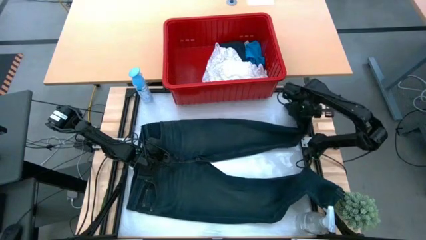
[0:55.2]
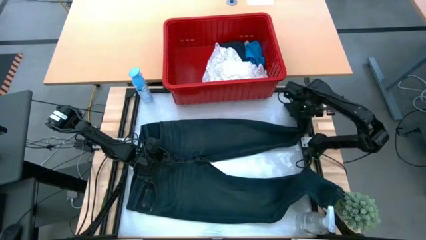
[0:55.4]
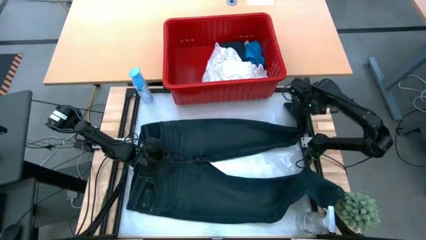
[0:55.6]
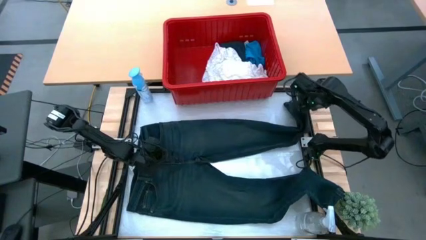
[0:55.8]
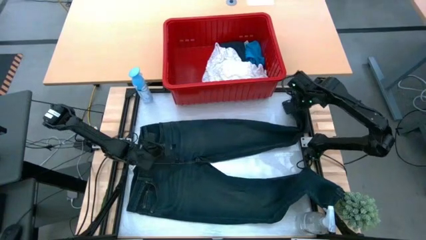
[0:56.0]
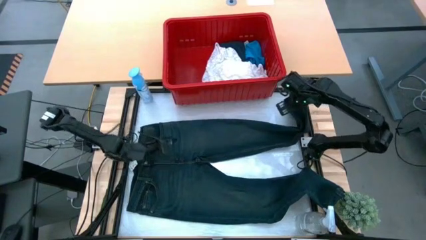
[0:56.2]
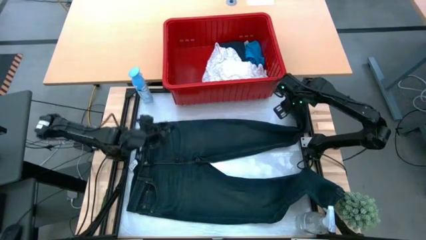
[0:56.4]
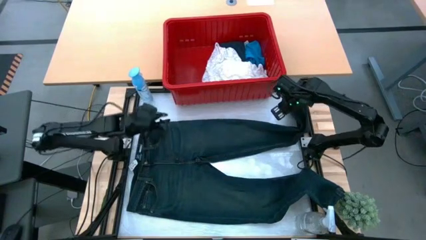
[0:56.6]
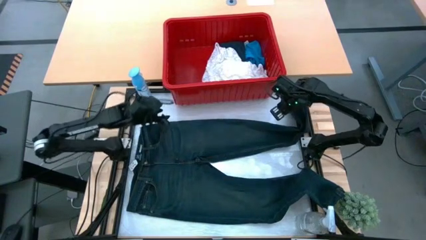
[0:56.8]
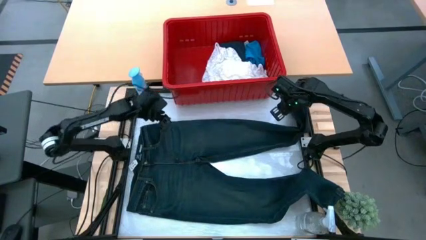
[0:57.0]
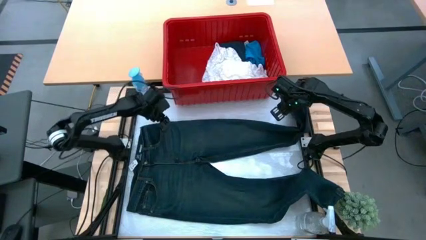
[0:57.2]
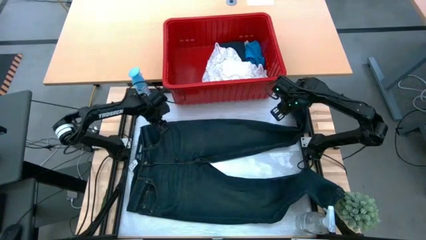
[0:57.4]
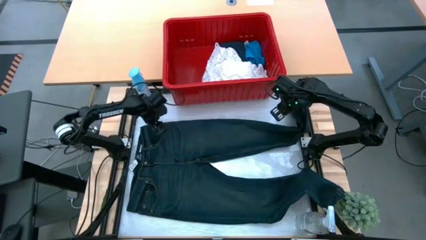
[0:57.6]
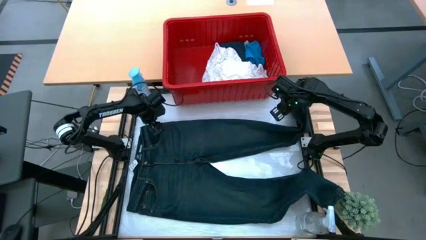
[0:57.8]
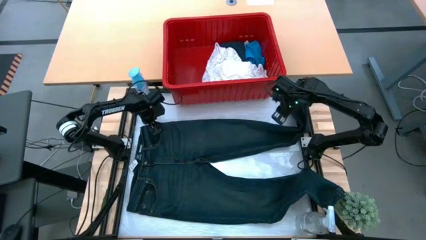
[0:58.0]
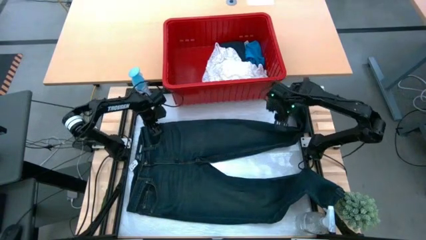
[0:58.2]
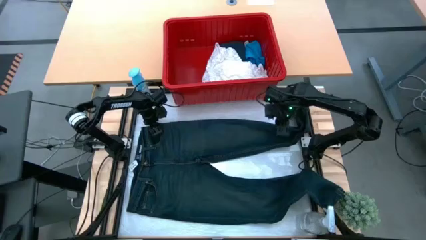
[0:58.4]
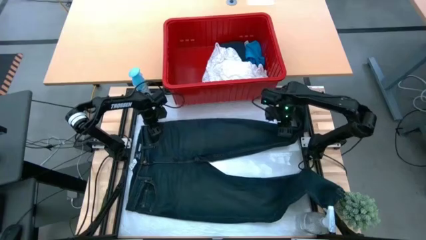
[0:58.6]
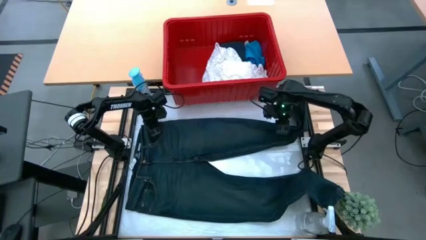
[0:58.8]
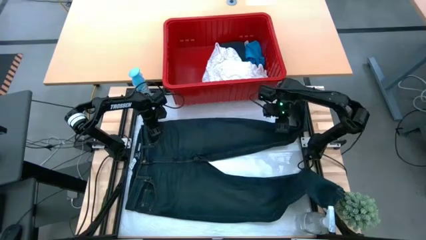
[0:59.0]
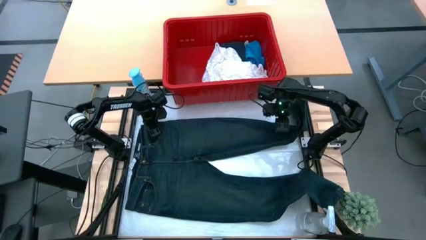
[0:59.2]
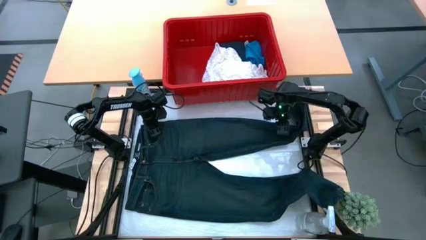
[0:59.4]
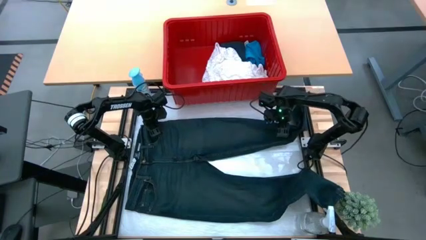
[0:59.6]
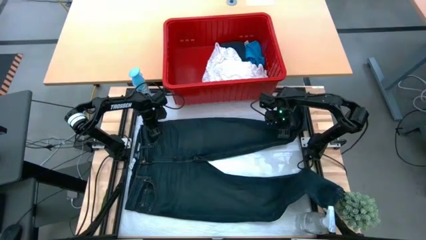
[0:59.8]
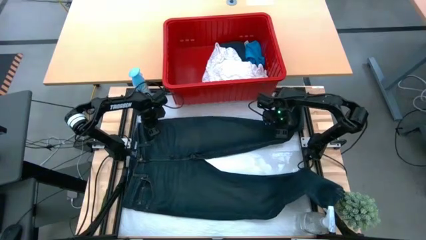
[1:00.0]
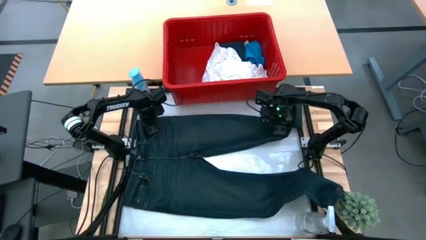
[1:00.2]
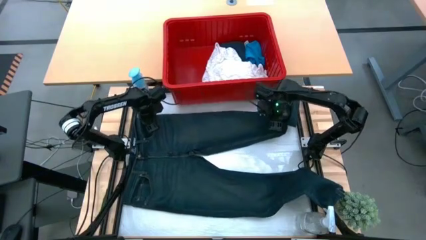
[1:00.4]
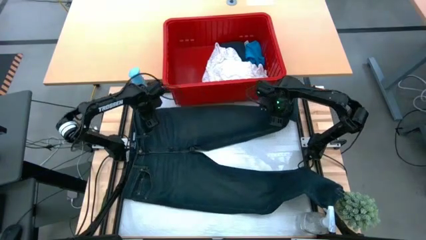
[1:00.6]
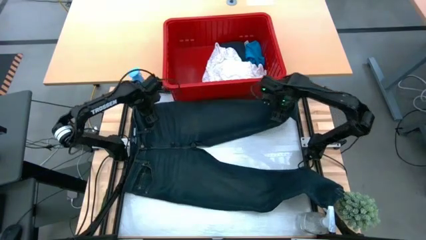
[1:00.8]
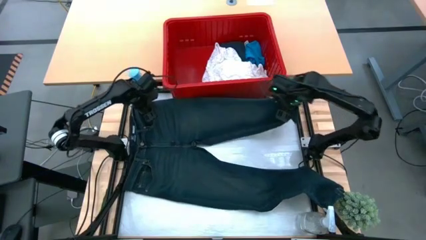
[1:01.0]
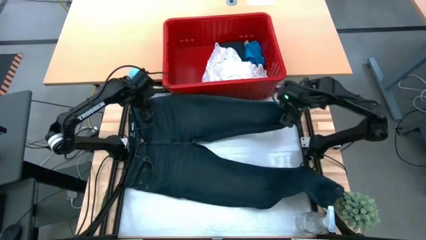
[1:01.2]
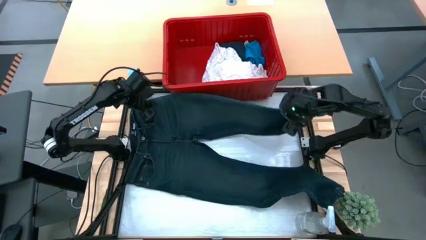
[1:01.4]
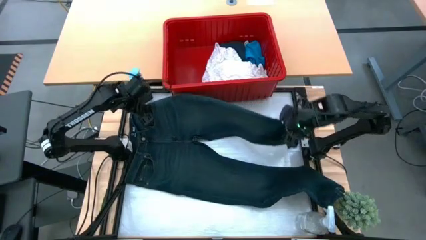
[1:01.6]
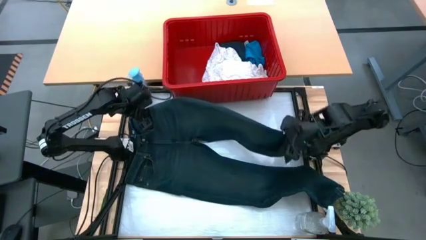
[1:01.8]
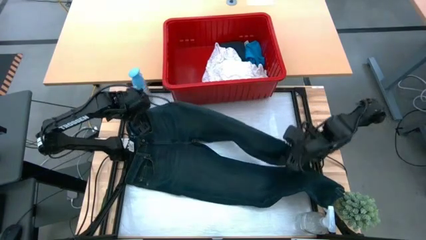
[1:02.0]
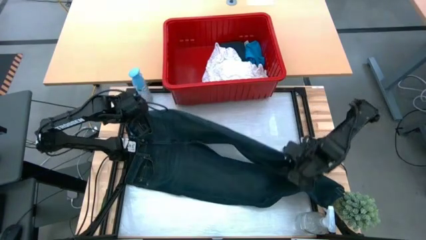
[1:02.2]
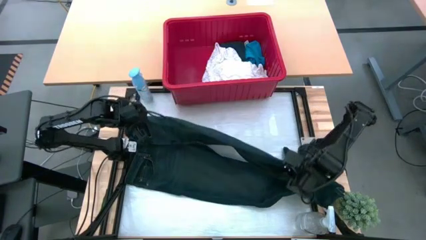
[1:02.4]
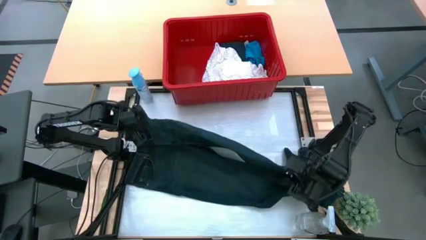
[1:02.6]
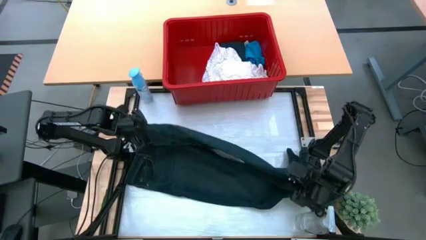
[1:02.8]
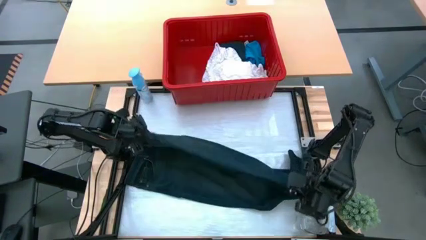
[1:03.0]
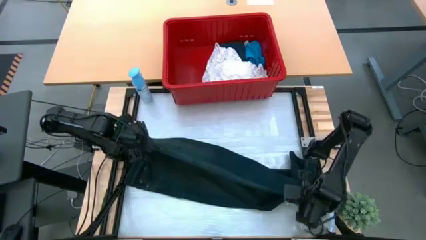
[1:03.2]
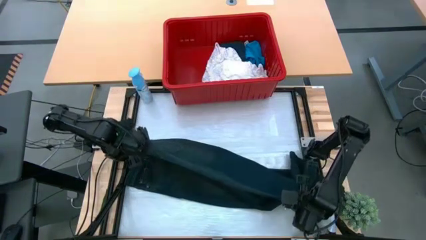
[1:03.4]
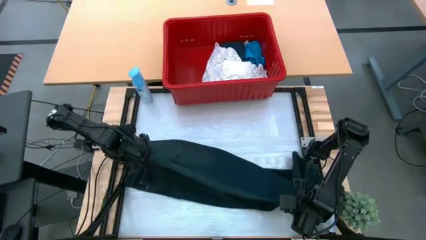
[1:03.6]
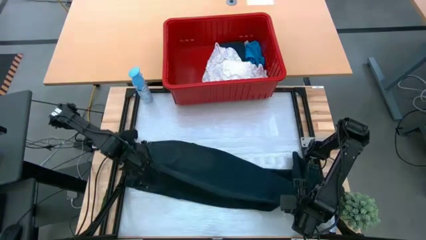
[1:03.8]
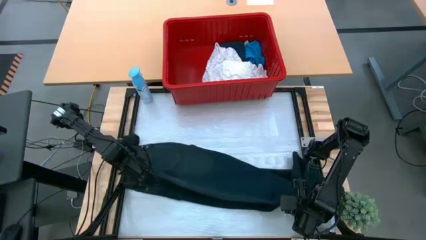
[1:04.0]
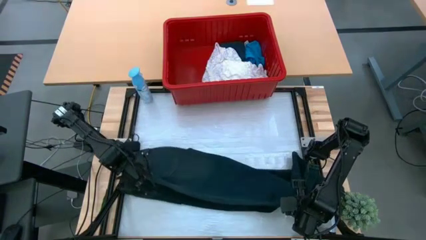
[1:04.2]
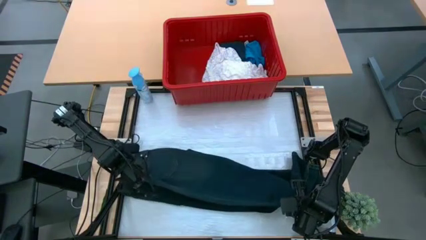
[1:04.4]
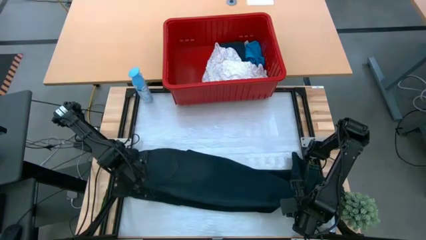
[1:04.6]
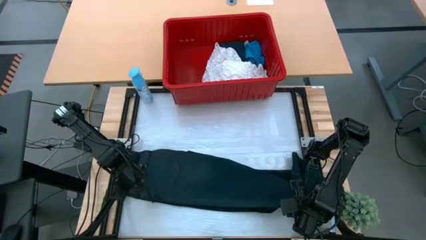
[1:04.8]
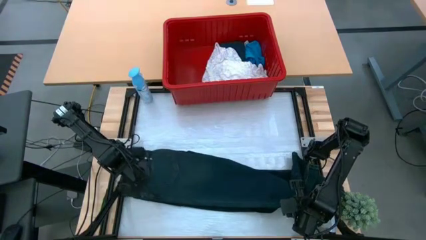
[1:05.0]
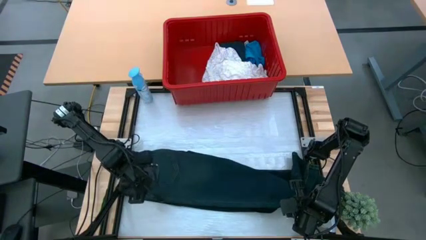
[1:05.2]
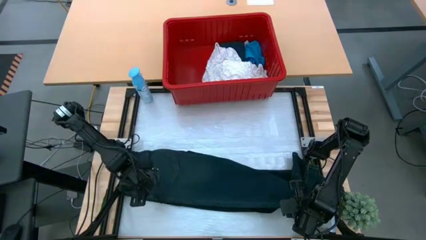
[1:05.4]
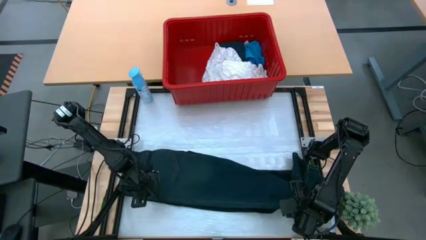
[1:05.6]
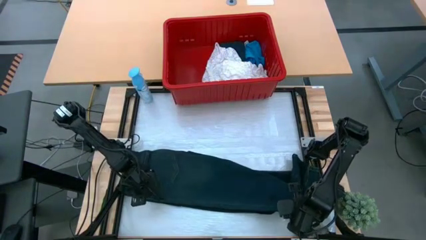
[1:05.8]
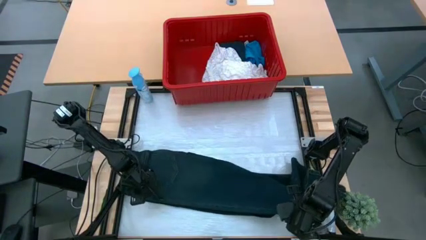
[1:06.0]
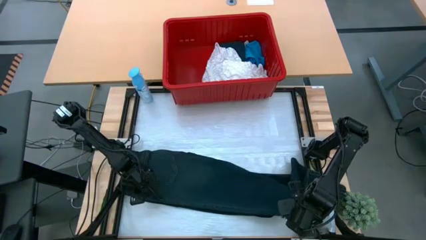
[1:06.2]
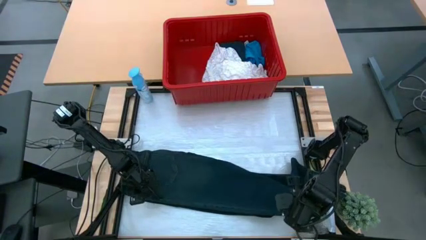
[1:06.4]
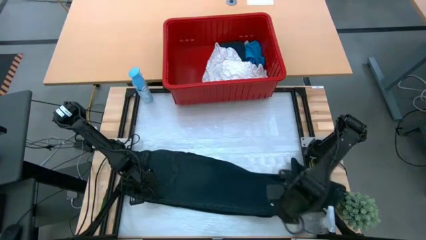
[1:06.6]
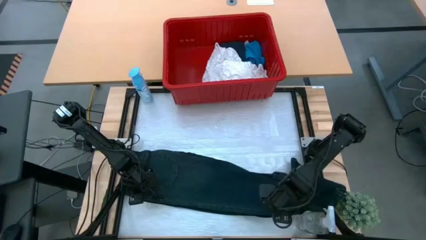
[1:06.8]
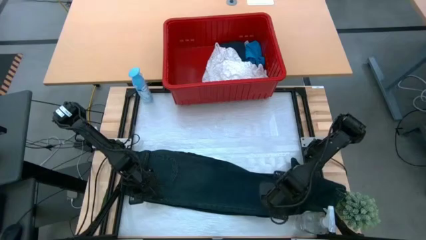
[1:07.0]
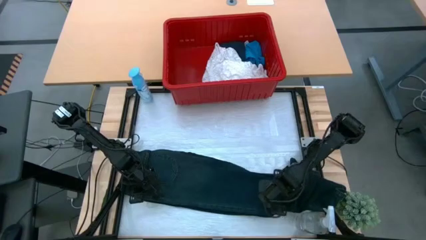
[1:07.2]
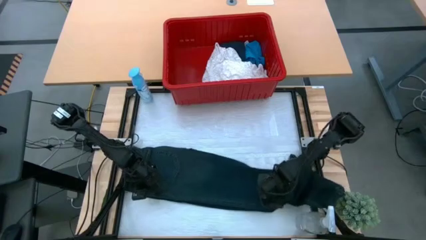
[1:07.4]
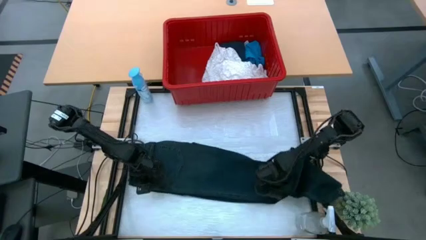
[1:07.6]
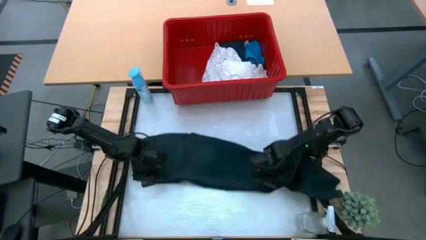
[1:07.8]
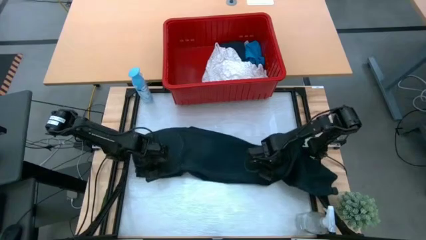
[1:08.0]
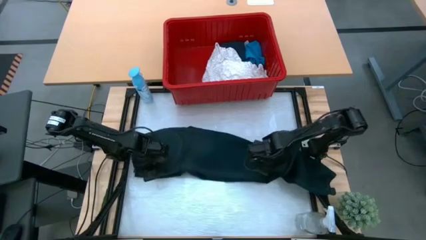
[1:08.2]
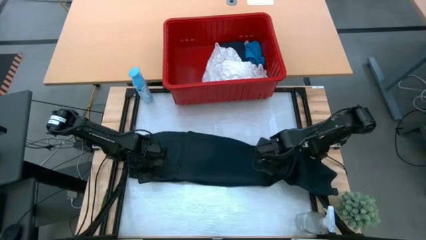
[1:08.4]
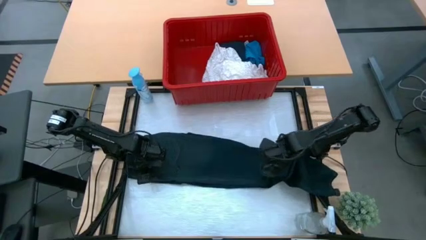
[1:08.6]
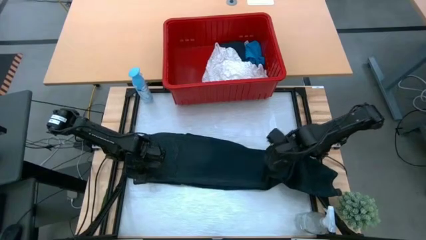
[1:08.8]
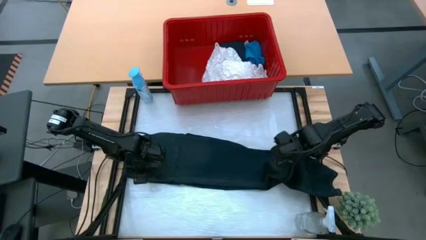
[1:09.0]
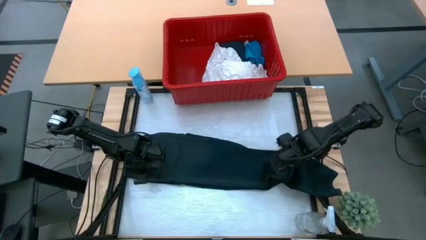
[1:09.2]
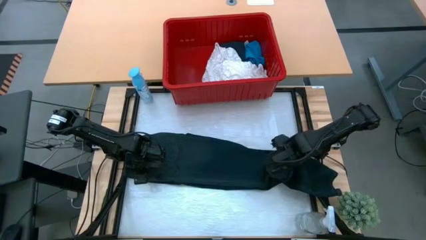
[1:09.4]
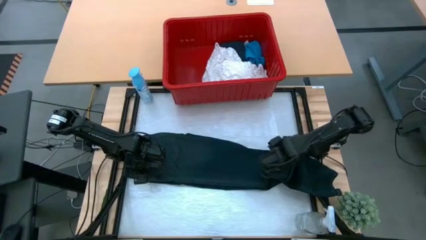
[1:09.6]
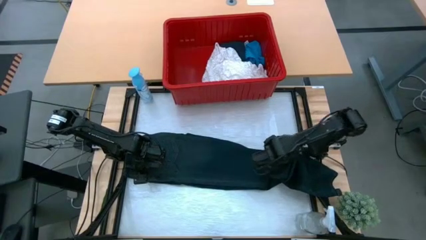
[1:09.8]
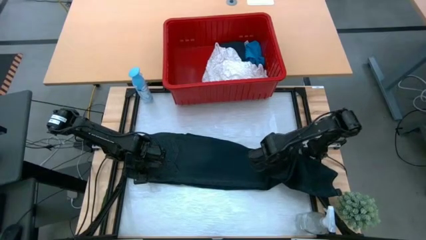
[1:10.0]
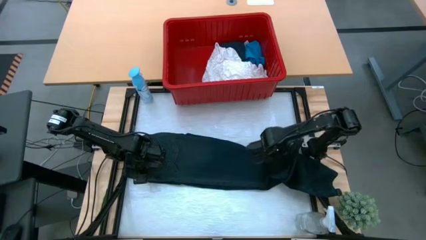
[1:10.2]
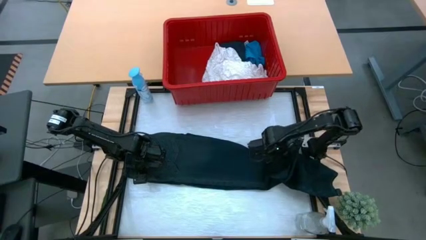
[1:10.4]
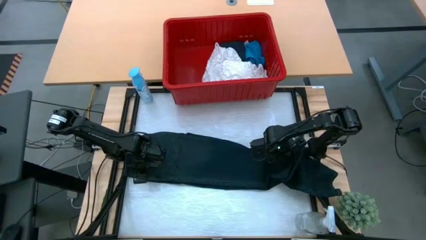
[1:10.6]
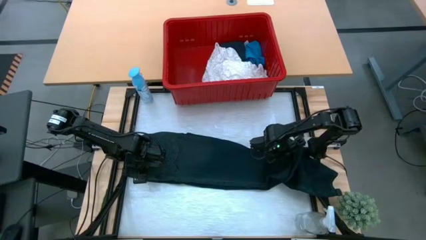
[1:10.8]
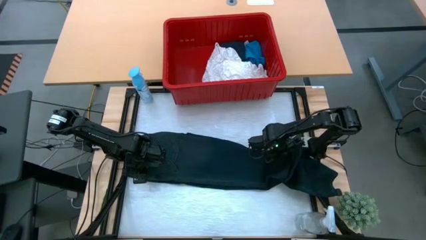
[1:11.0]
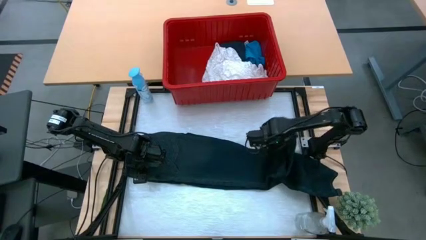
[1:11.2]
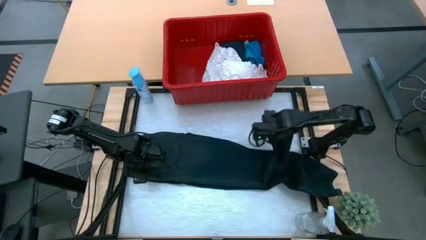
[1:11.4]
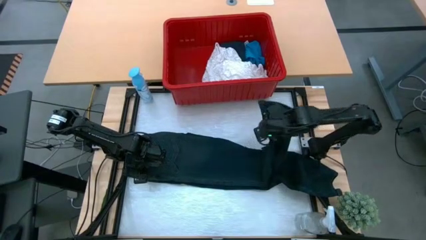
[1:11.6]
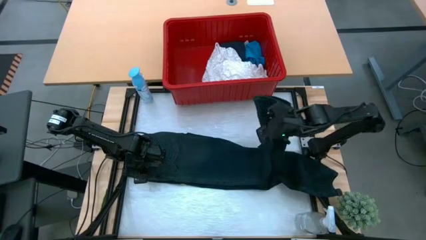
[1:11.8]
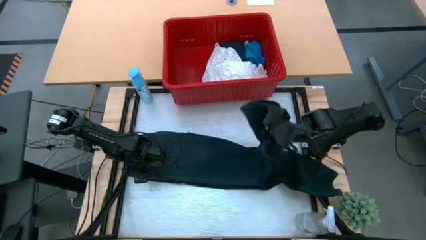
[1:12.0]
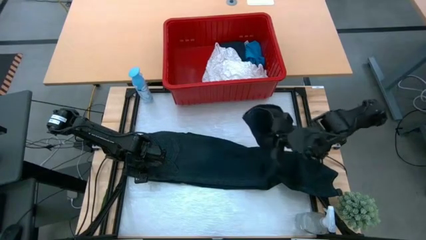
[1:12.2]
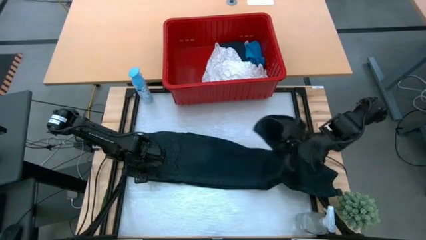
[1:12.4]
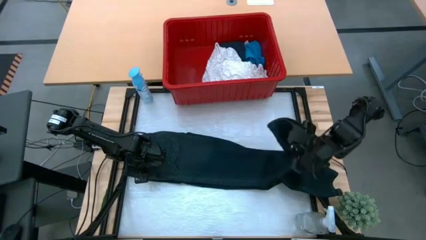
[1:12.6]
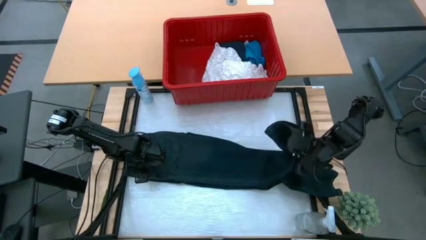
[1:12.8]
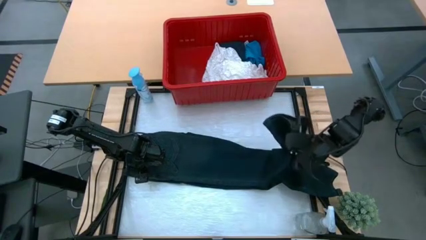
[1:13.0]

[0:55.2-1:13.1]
Task: Fold Laundry from Bin
Fold the black pants from the red bin
